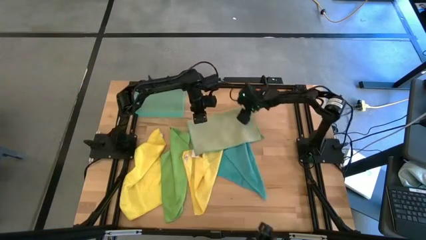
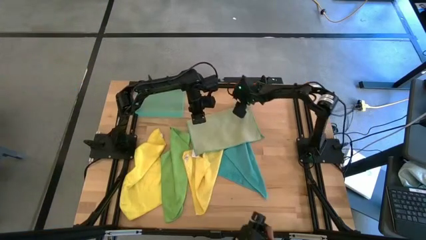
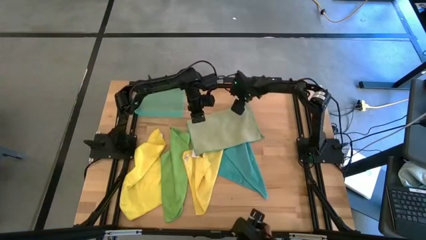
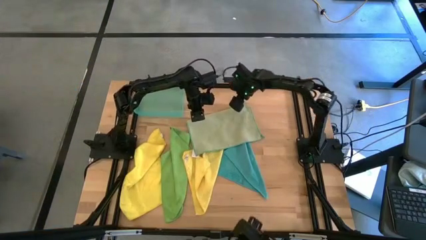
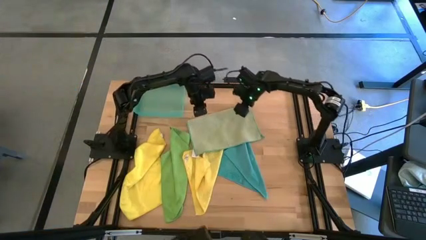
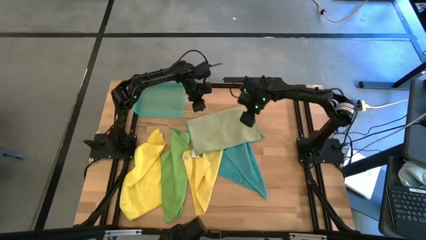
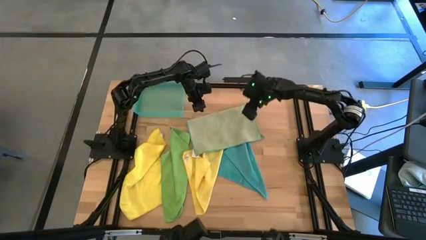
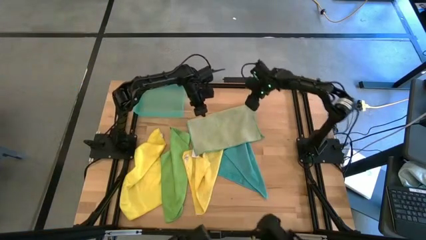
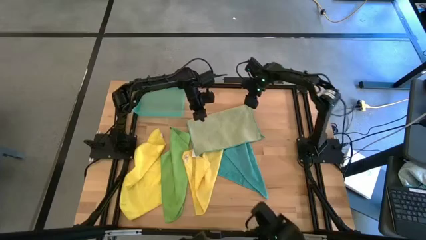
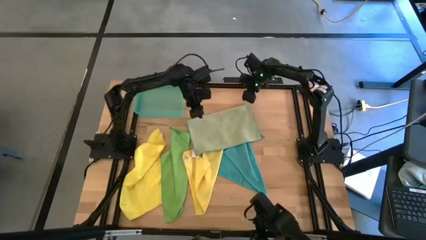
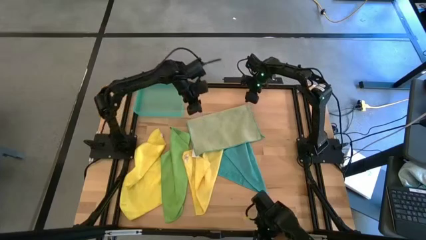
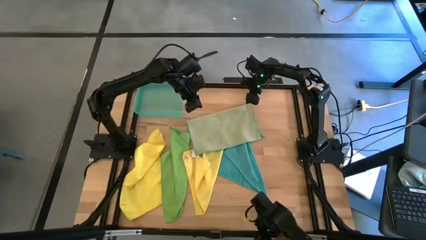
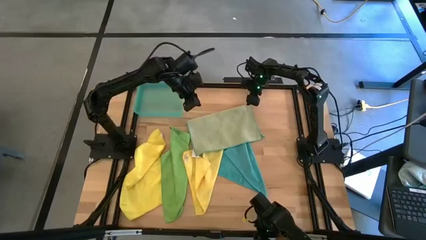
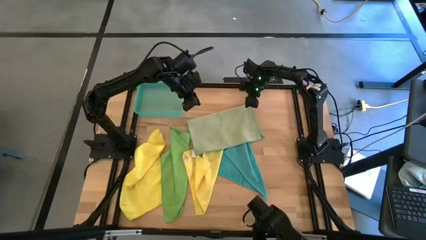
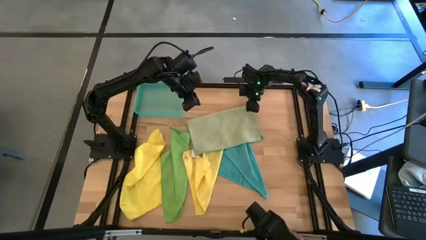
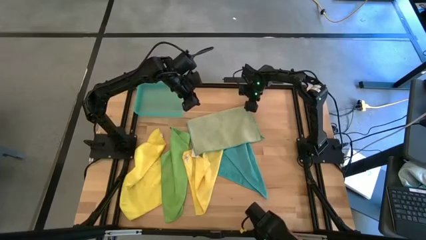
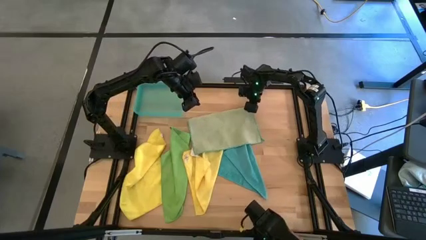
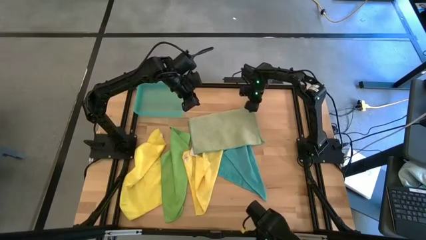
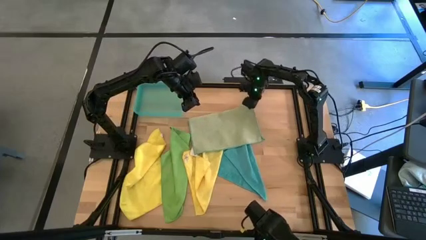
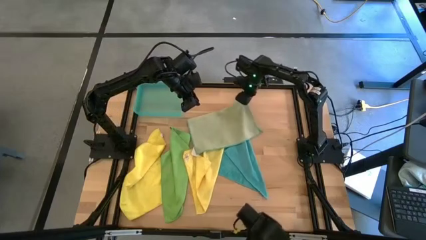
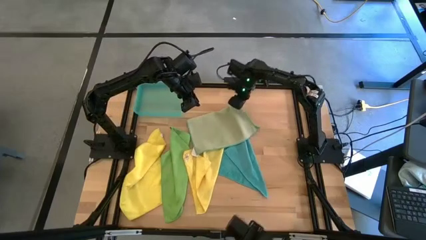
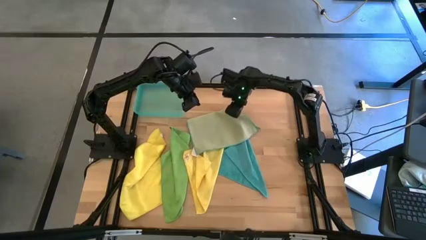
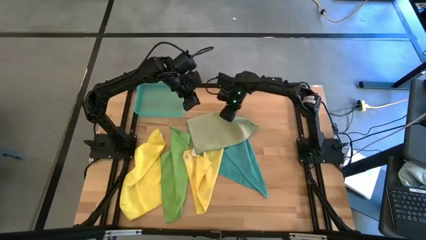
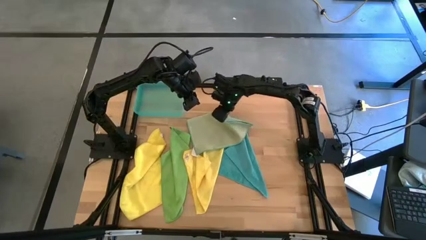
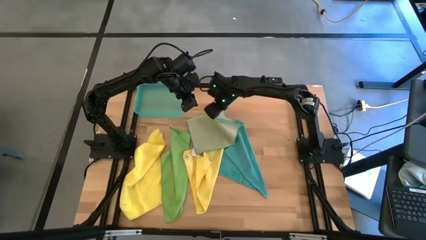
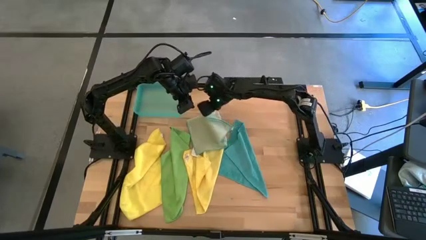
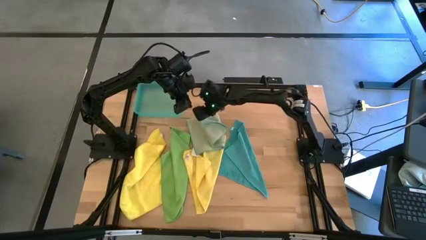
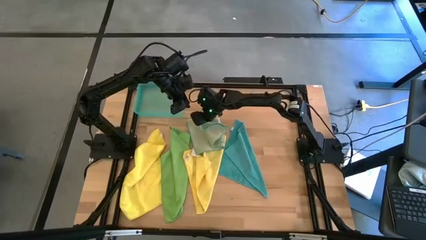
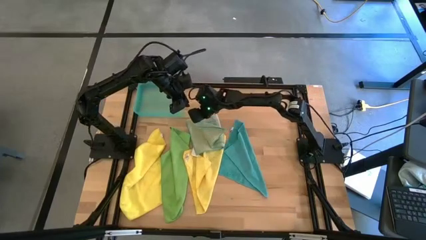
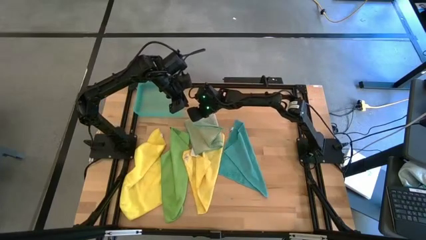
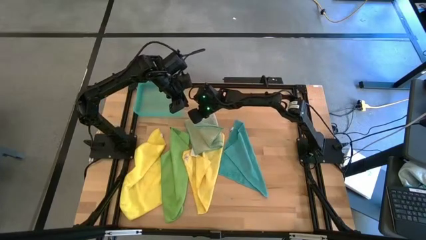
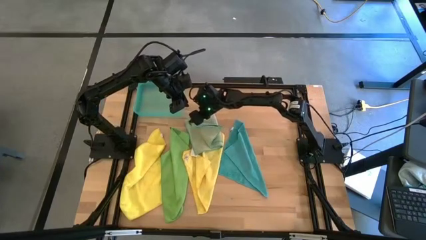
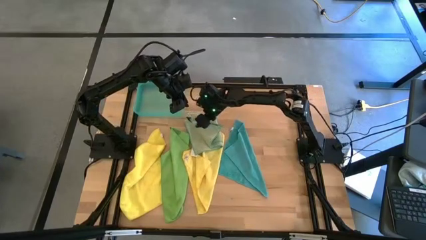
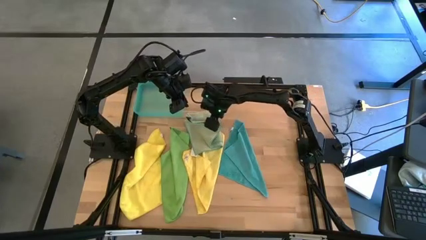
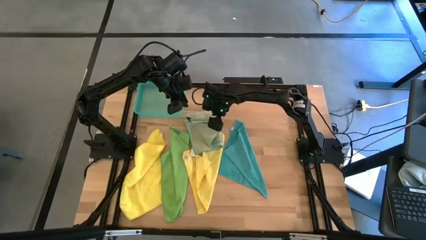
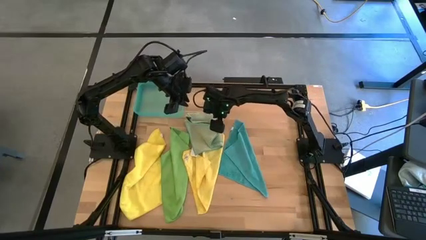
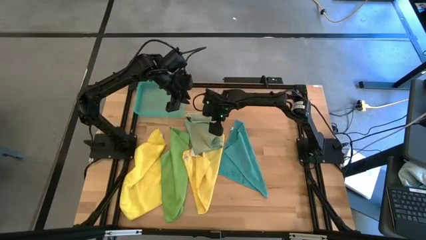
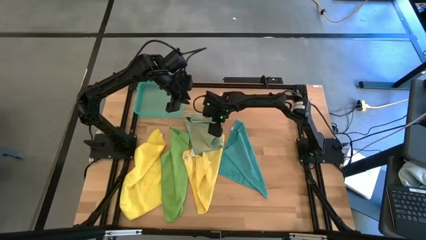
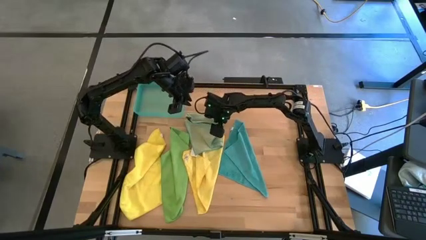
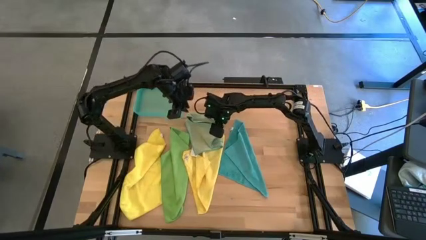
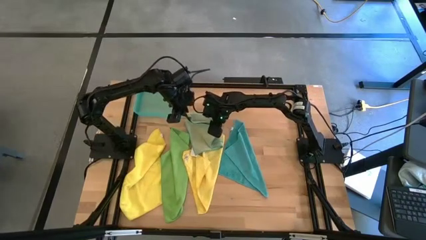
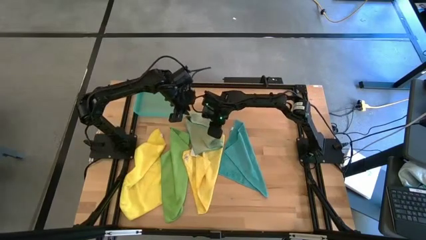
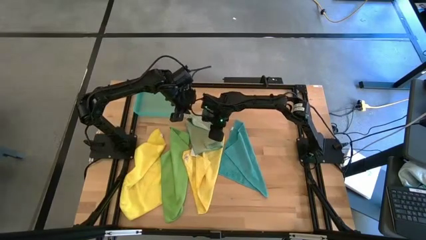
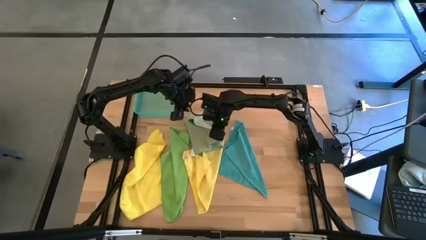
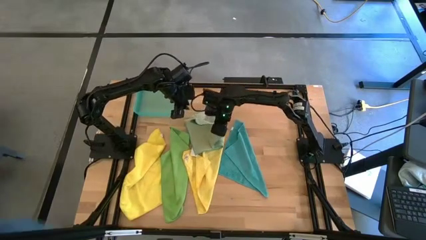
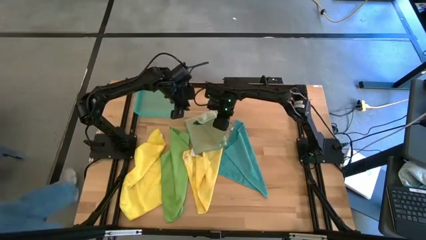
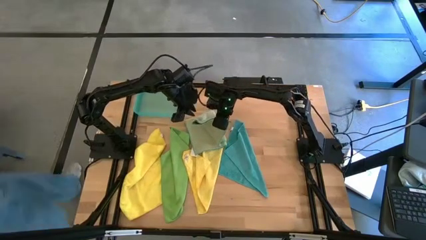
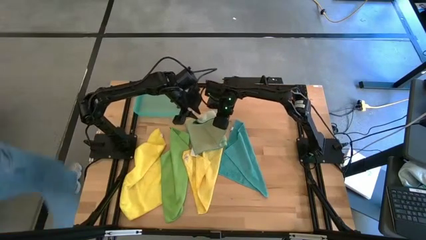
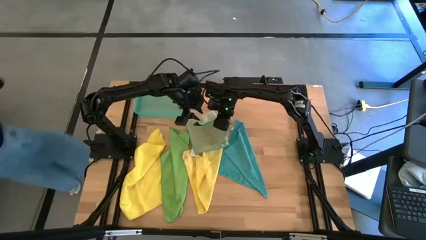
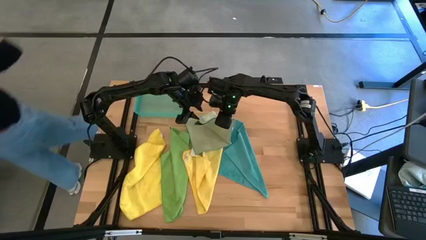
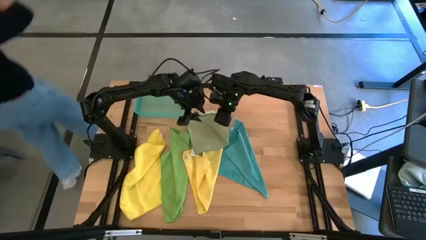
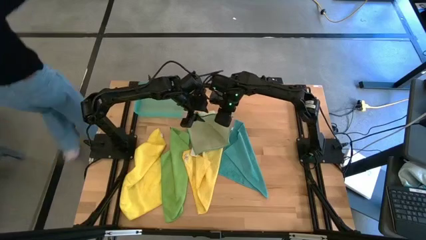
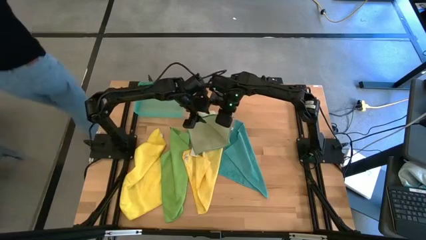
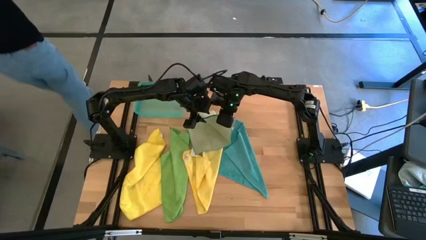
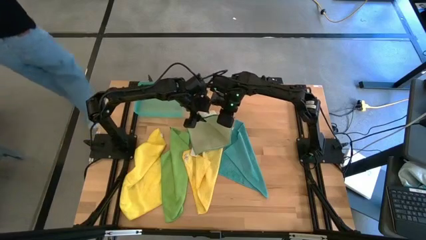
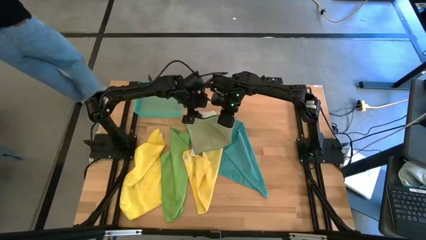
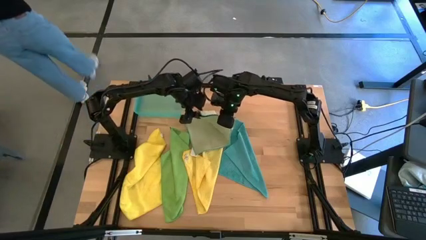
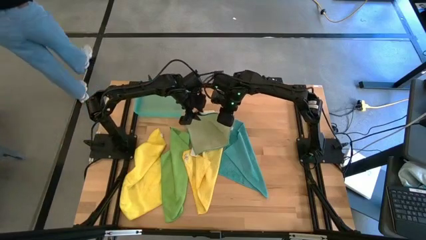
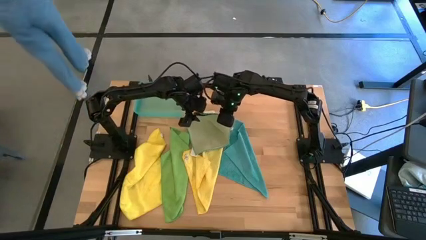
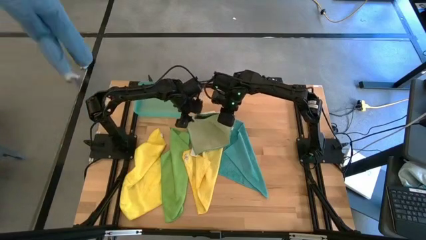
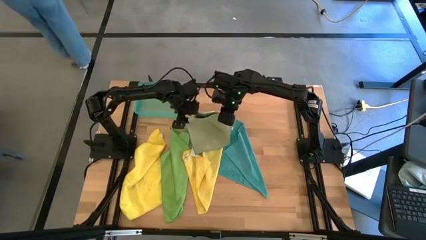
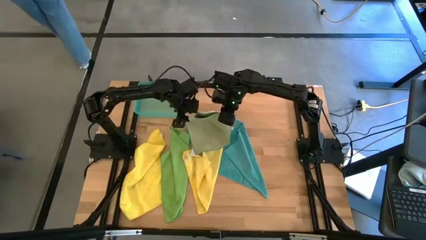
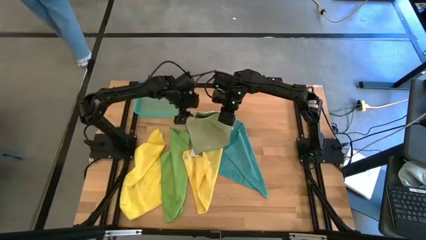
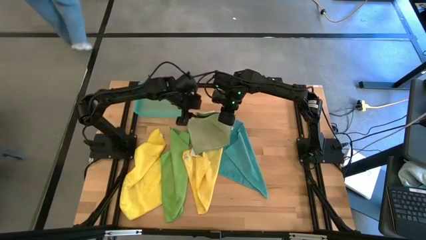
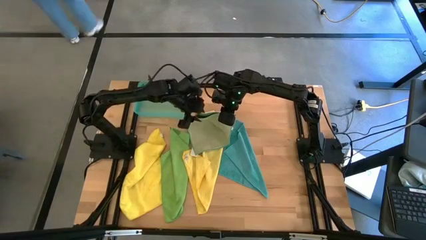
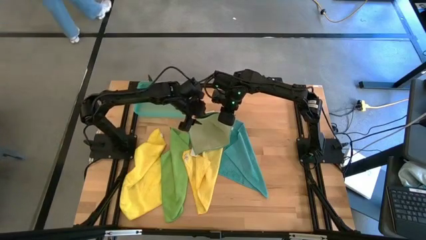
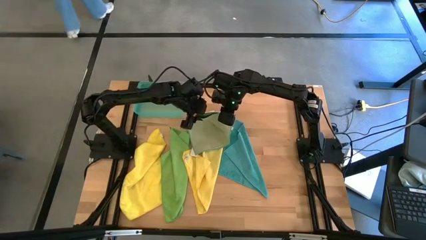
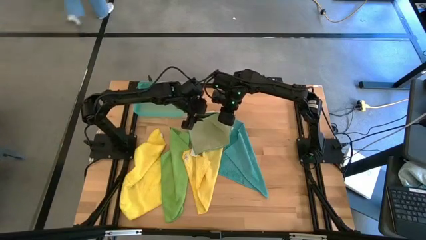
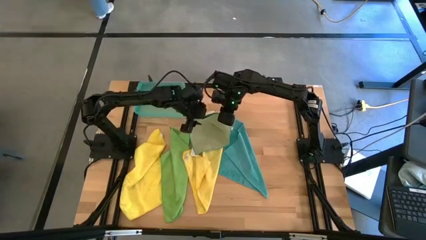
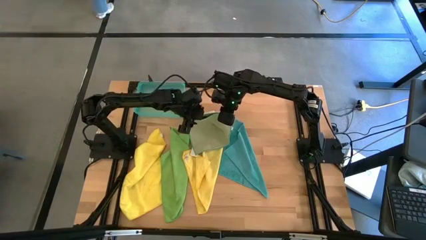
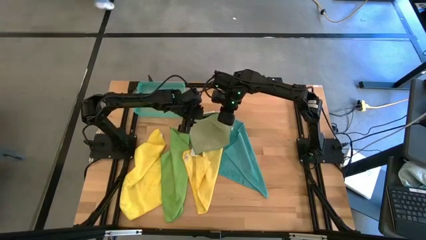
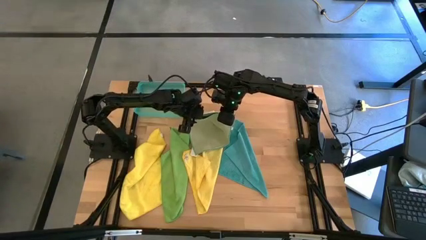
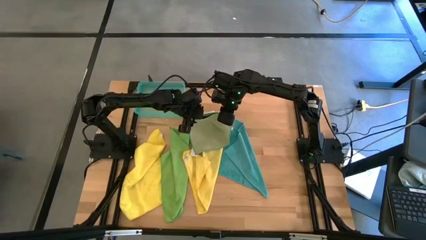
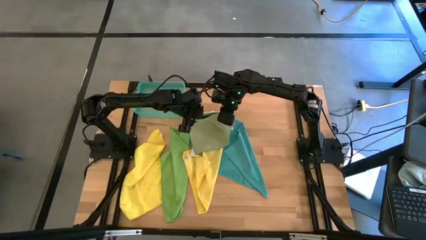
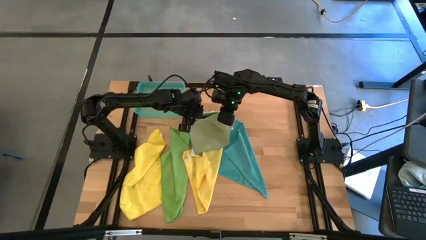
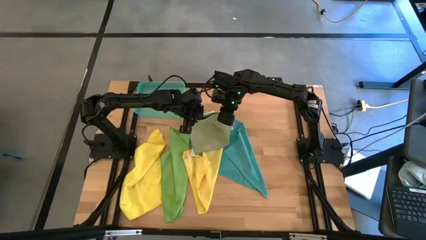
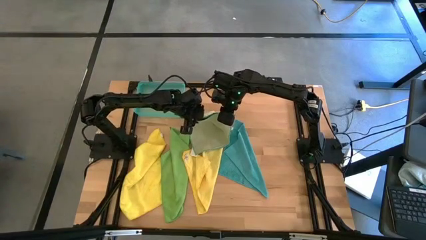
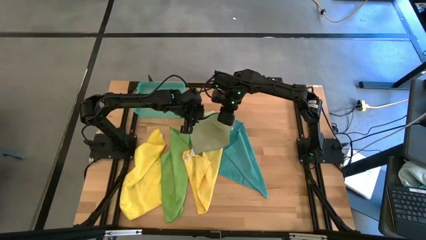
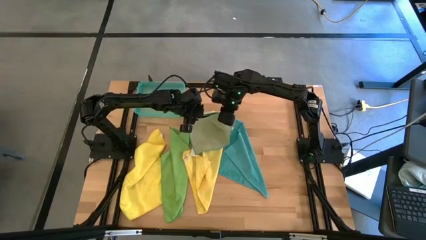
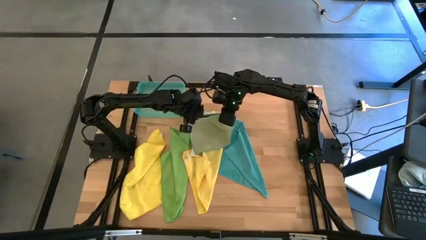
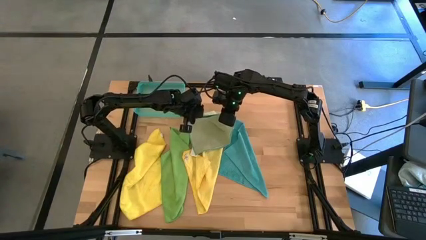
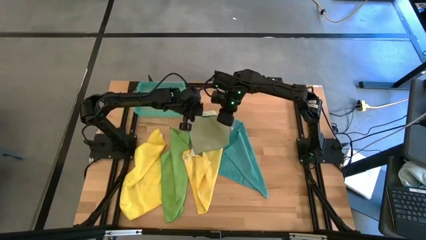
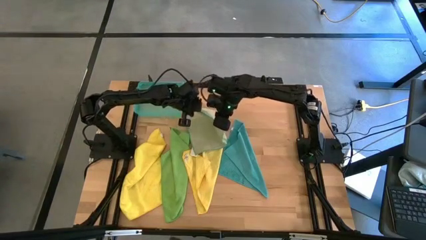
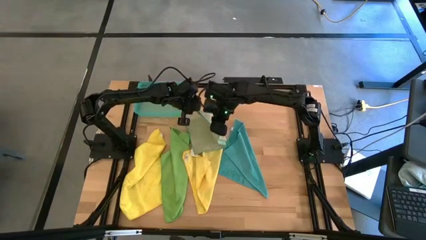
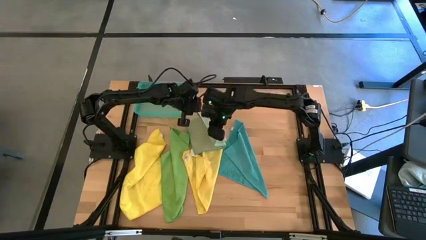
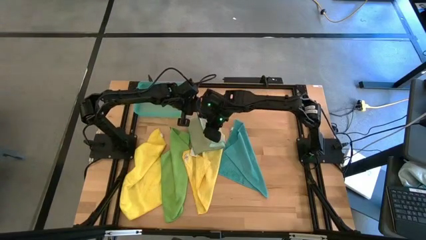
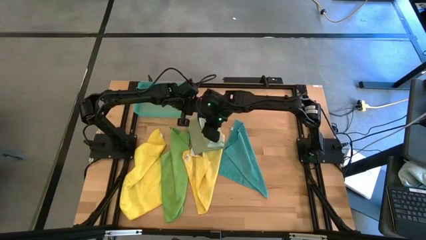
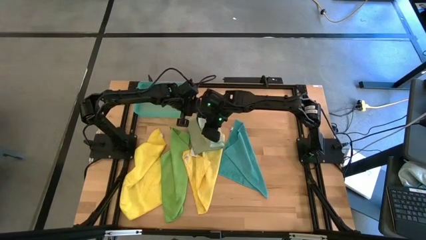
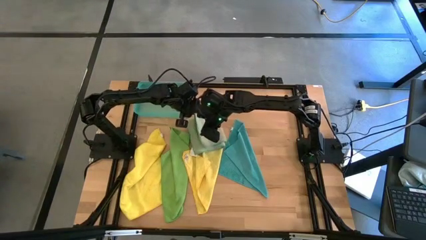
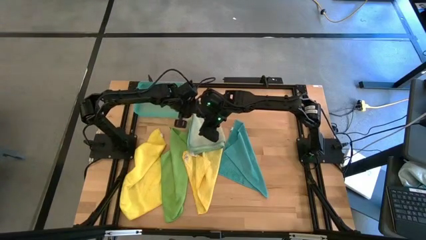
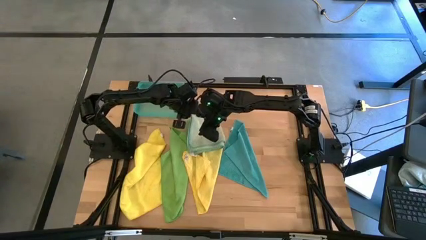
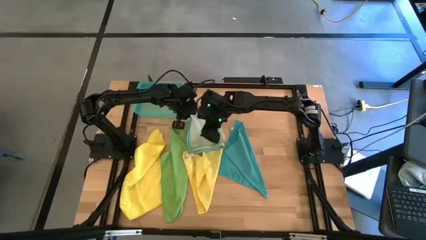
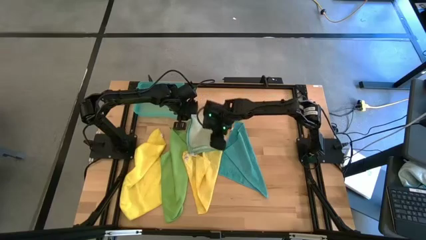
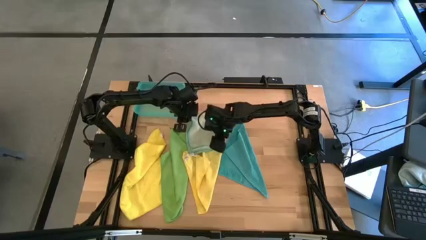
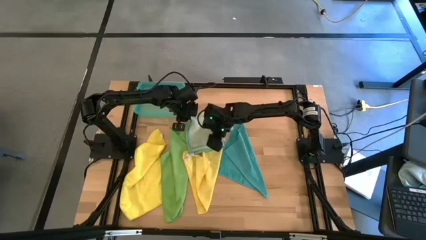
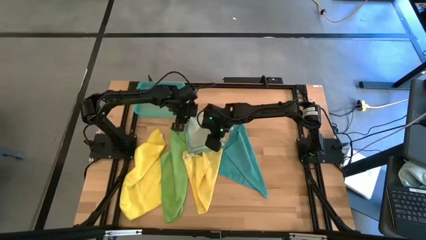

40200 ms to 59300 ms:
Task: Fold microfiber towels
Fold the light green microfiber cloth
